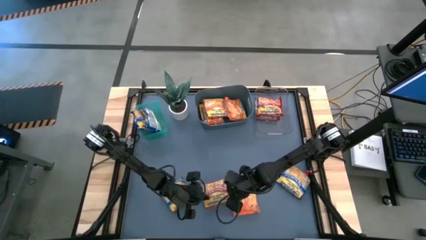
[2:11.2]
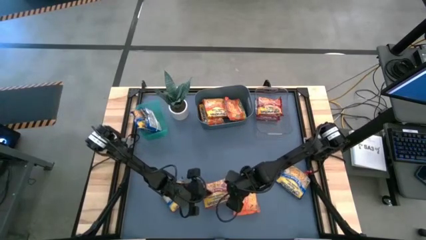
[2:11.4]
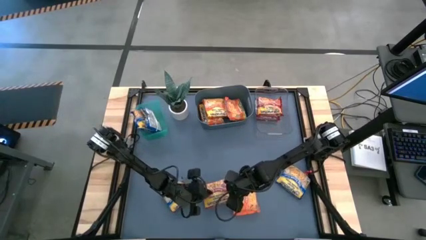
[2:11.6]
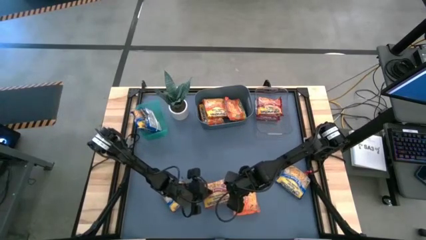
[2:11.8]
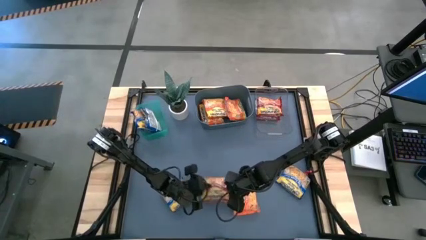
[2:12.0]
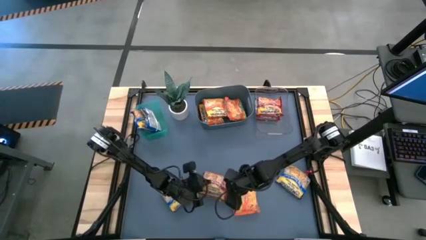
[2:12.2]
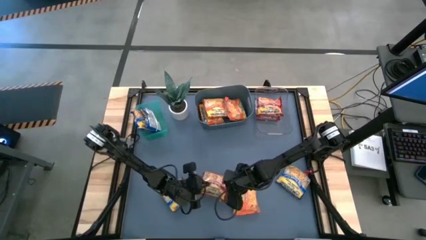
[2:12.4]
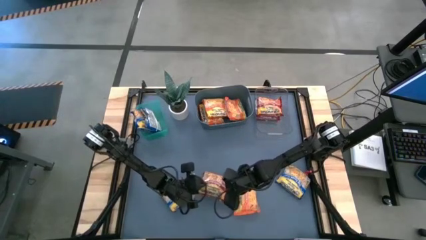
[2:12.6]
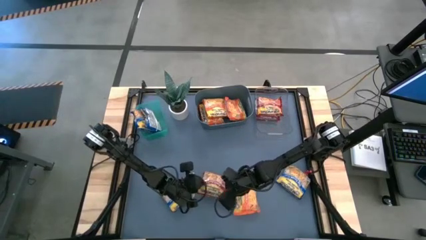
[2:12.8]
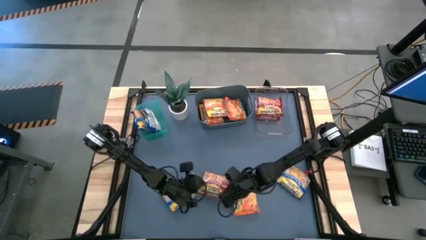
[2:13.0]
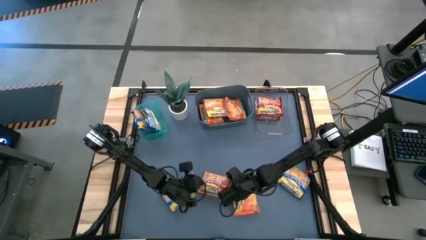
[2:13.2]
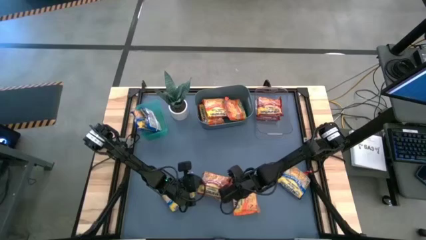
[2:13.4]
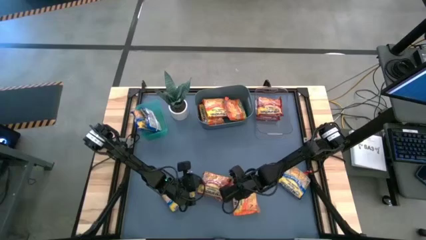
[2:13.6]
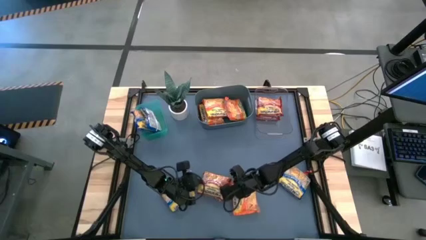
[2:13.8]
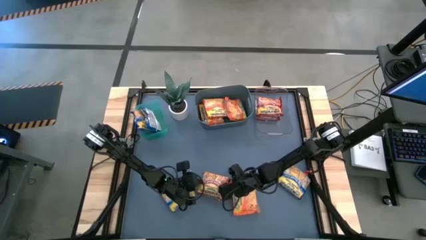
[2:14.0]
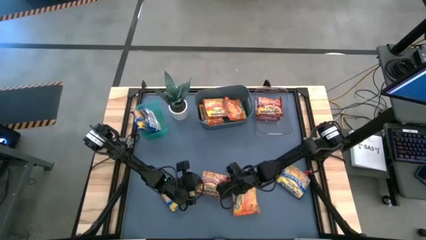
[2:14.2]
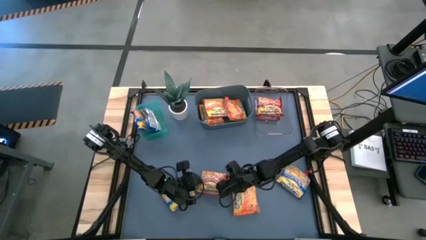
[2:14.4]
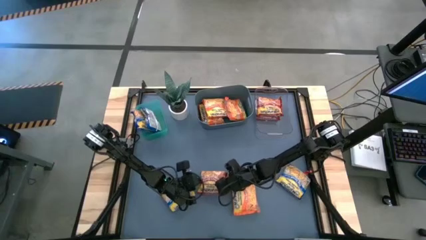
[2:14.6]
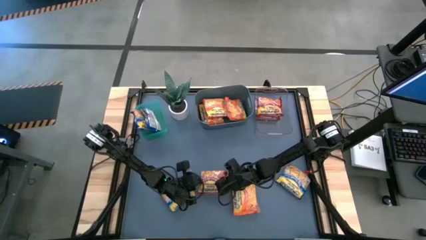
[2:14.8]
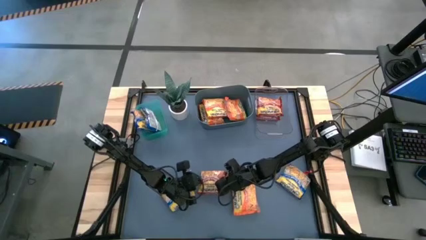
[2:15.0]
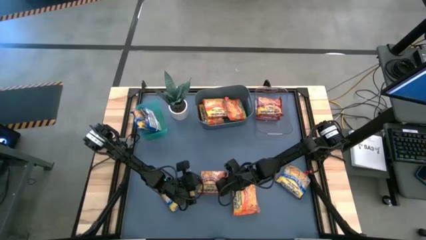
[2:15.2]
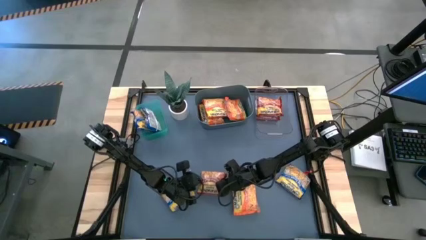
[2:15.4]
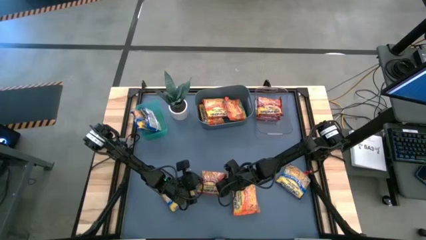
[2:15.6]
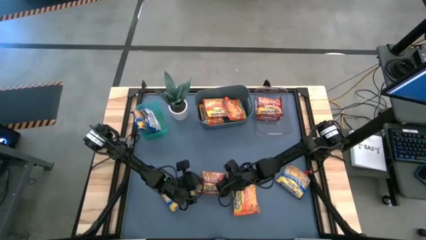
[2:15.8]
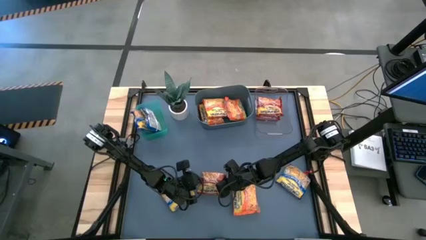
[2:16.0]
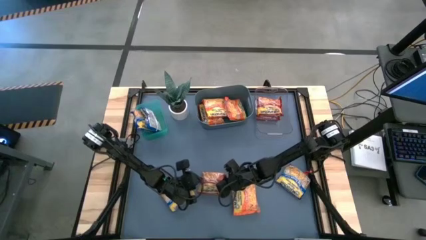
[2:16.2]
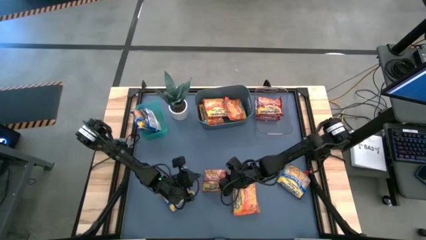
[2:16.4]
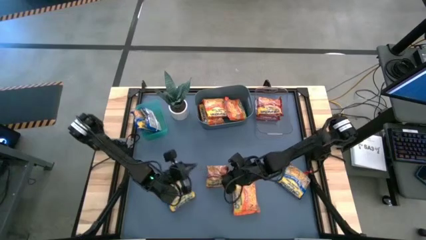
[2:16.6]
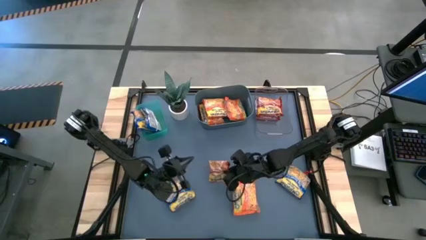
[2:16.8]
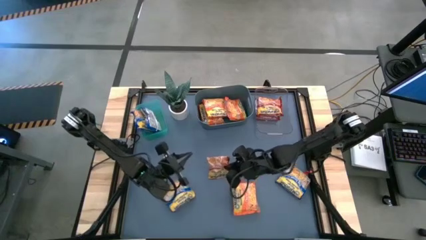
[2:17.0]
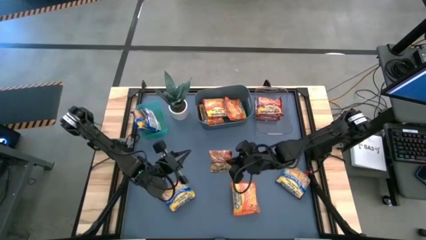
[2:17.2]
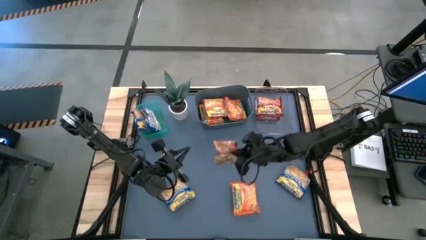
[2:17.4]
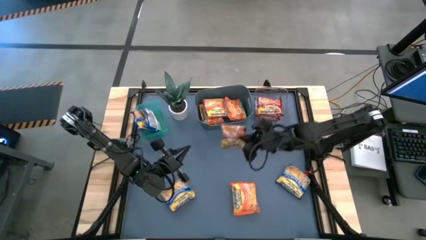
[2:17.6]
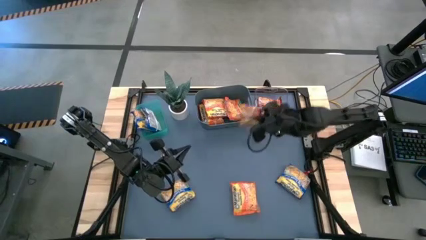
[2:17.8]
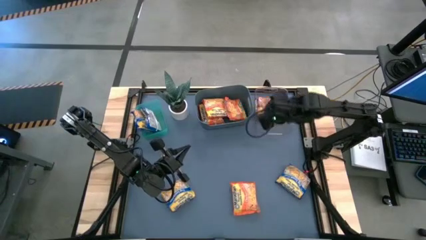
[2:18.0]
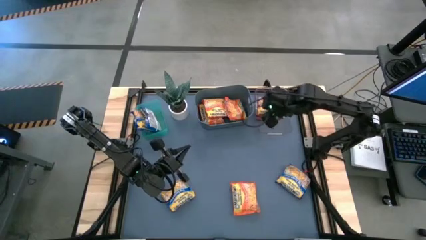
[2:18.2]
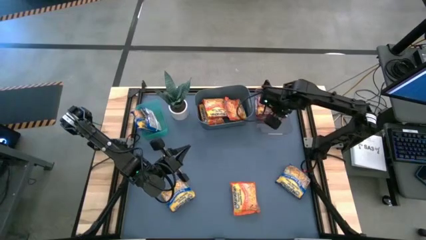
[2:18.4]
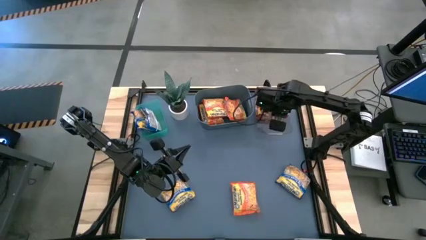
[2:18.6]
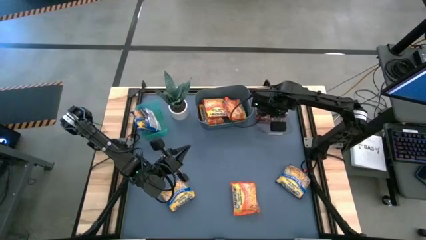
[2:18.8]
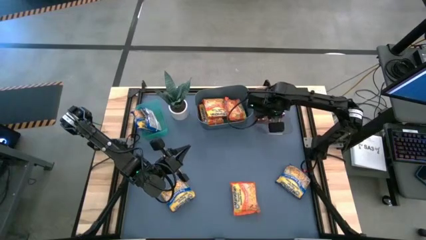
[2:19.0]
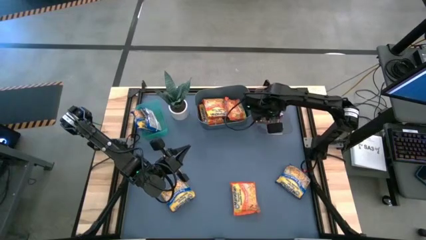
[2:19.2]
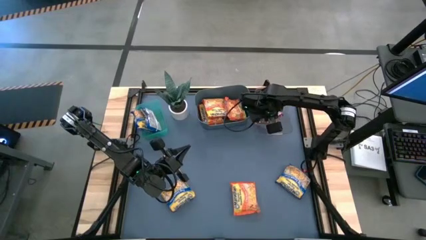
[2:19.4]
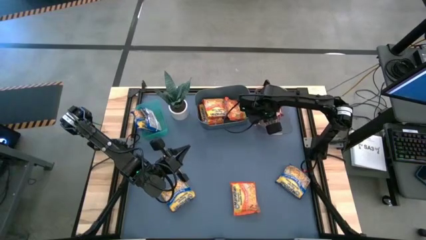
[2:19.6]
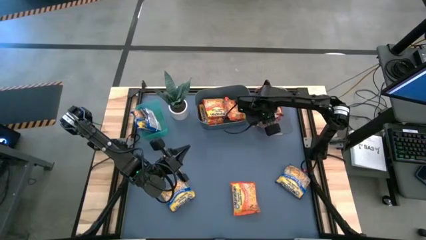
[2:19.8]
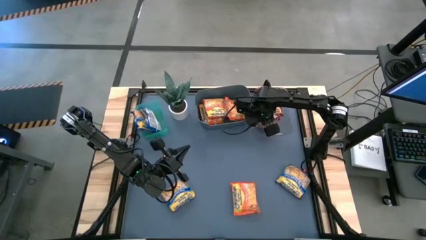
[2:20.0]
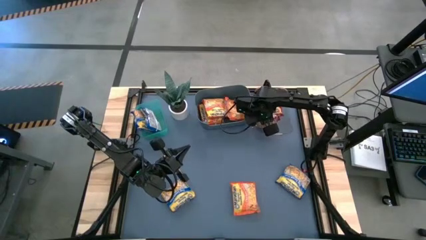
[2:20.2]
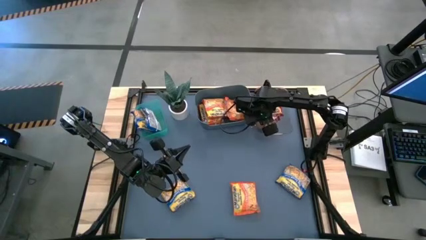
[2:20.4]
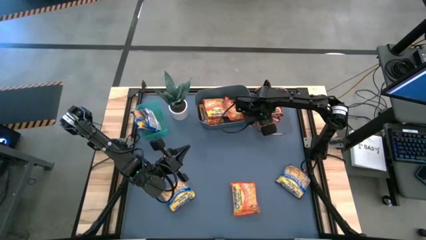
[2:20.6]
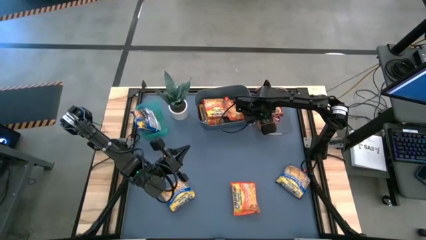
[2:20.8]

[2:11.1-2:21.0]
Task: Sort Maruchan noodles
Put the red noodle pack into the transparent bin

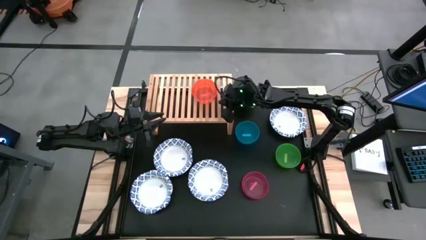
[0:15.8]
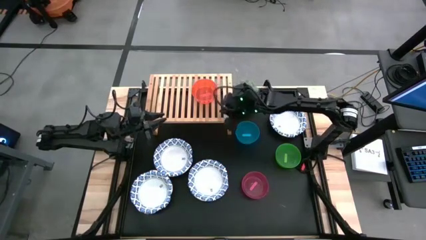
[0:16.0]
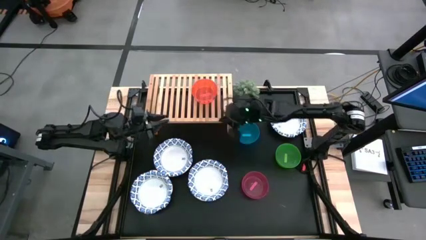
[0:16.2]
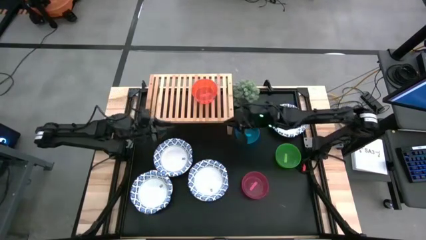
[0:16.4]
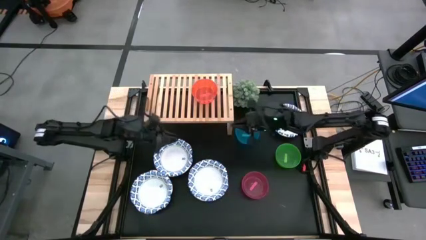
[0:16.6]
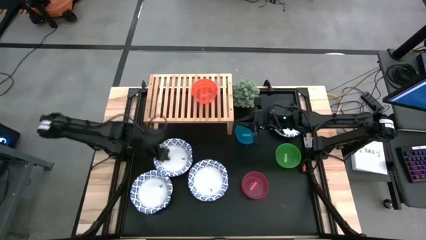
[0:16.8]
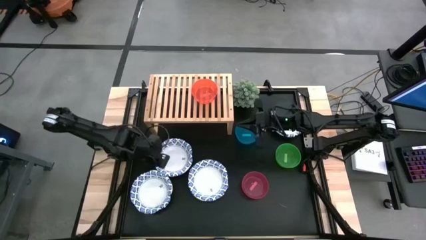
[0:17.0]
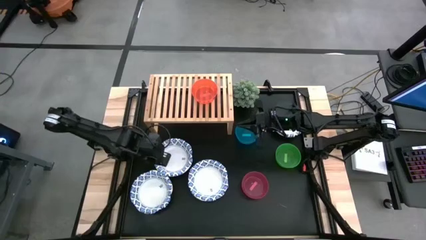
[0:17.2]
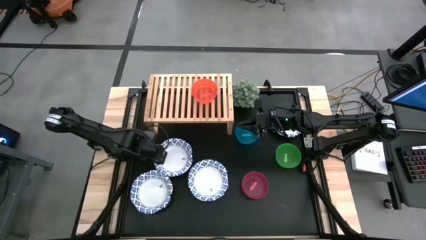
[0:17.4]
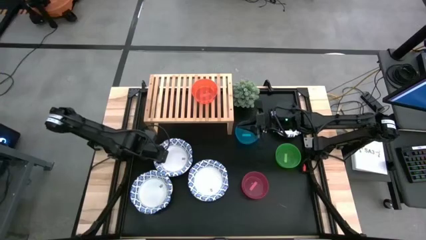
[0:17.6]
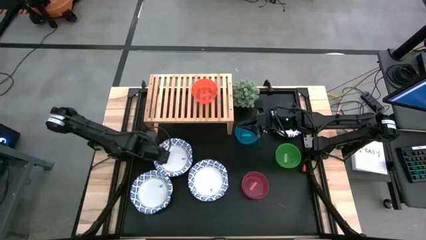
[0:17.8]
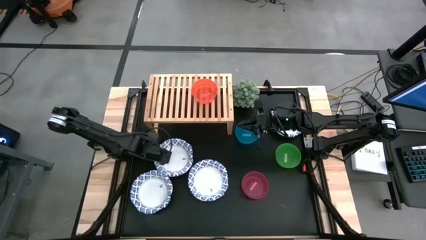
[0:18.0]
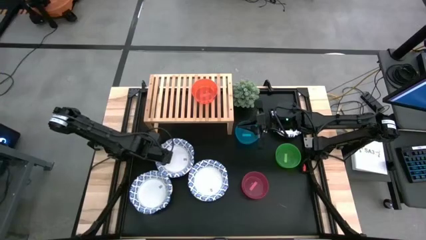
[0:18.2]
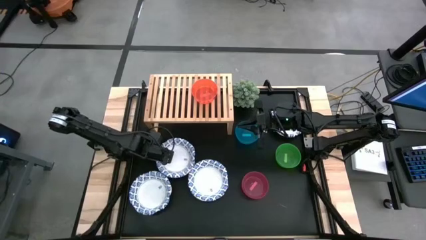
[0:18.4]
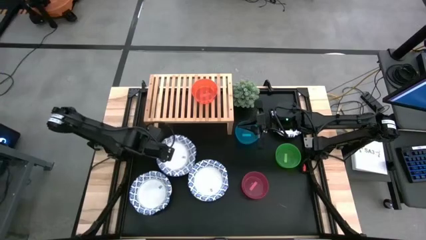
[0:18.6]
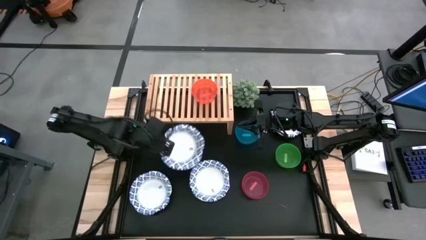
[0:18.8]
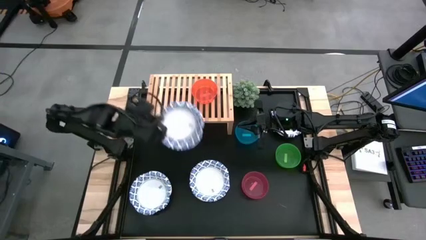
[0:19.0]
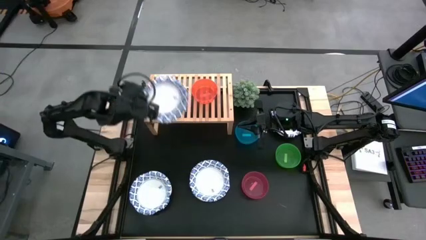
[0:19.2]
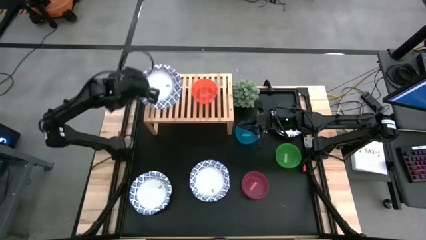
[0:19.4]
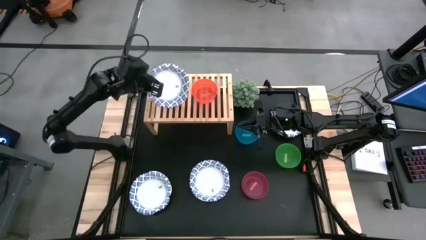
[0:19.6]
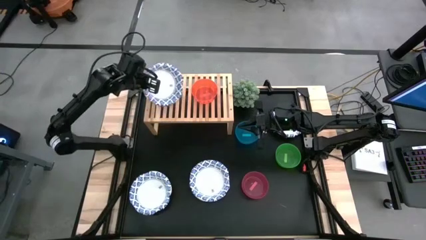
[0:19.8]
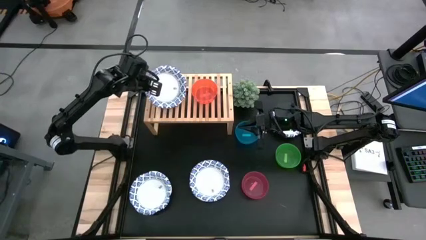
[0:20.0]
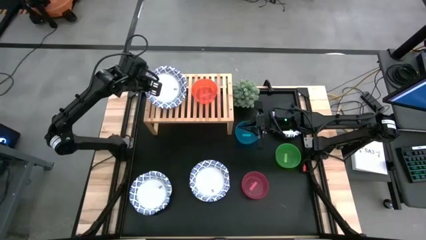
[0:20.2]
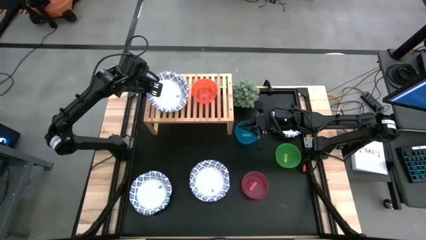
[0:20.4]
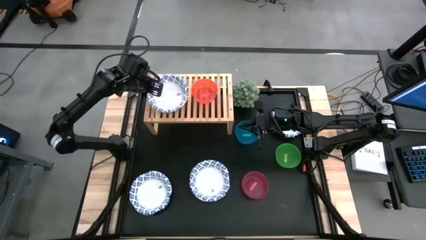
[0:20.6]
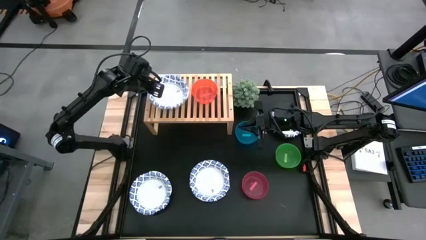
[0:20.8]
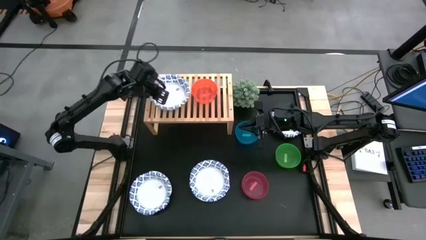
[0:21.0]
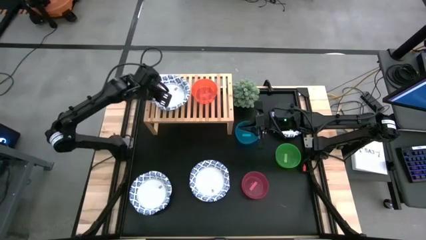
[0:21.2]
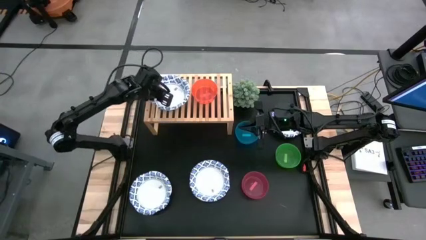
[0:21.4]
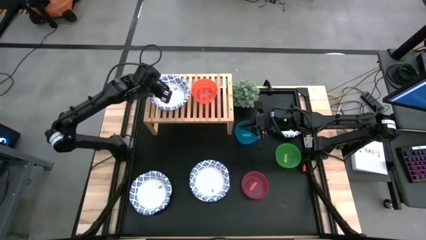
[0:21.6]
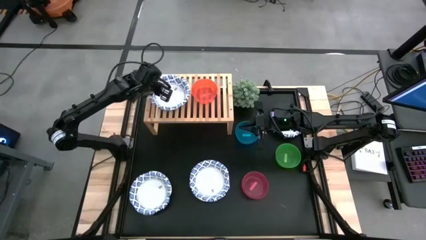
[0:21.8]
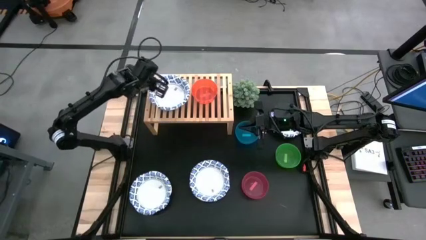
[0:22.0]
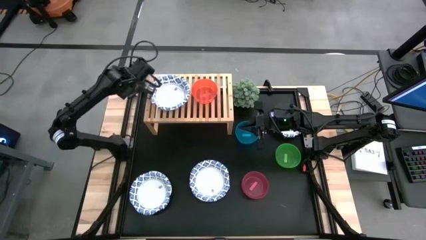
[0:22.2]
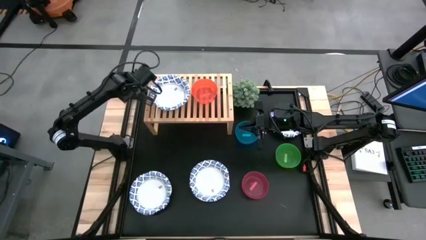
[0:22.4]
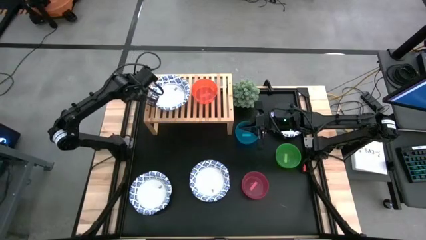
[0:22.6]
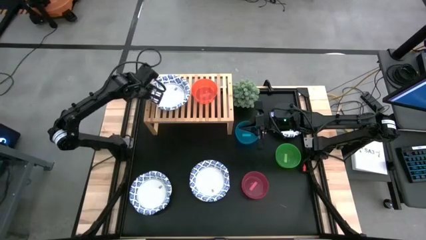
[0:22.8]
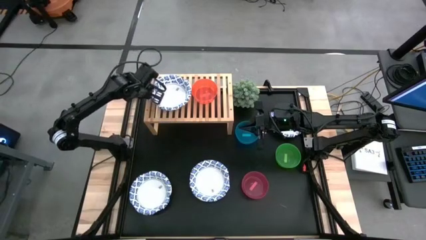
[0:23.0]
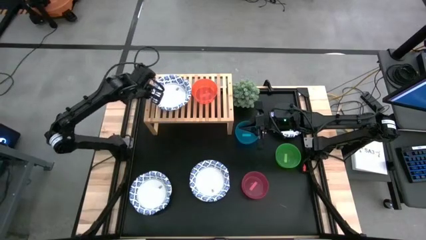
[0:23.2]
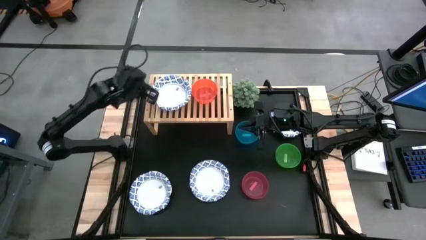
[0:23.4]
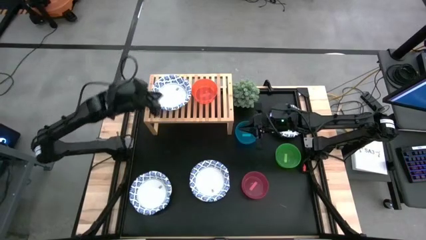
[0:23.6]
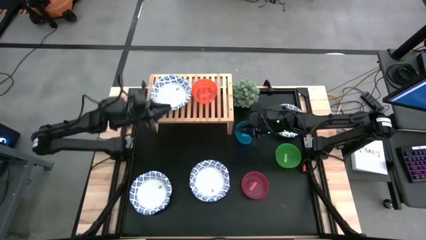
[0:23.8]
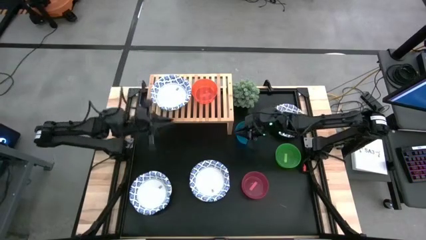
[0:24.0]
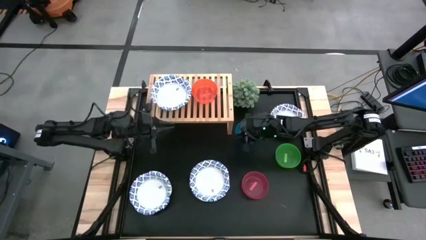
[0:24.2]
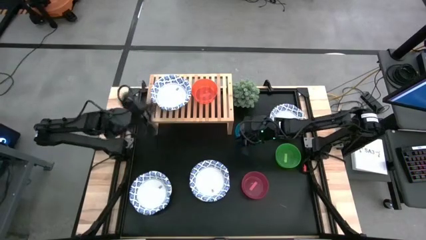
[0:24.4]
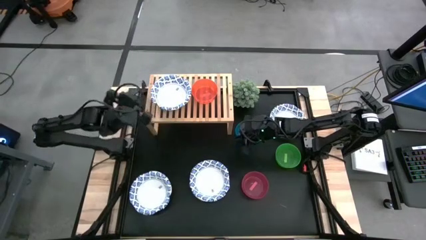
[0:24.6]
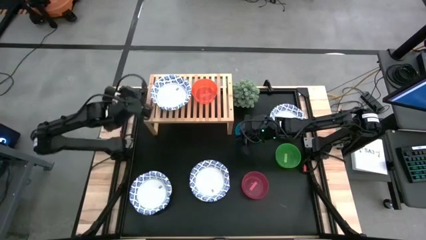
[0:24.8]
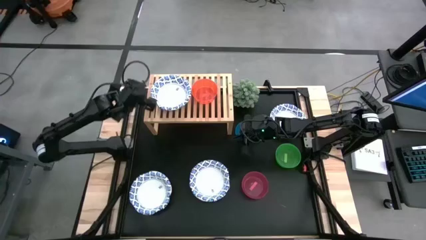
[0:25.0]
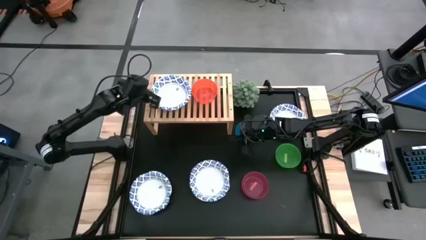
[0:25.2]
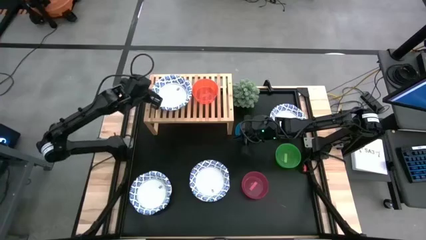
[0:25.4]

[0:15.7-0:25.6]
Task: Place and stack bowls onto a shelf
Put the white patterned bowl on the shelf
